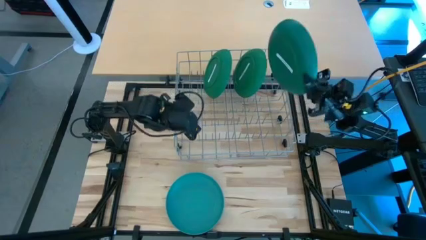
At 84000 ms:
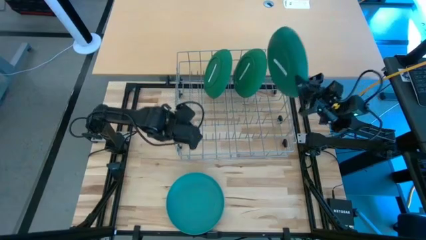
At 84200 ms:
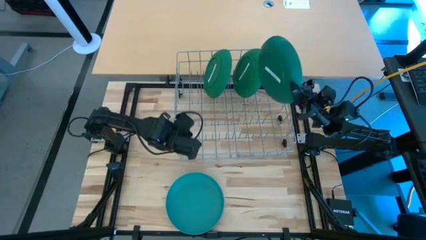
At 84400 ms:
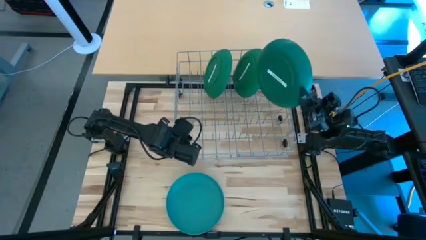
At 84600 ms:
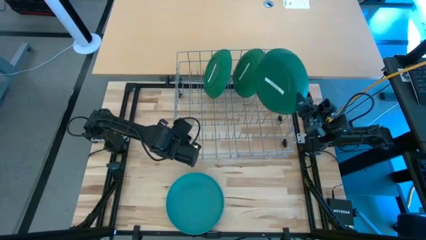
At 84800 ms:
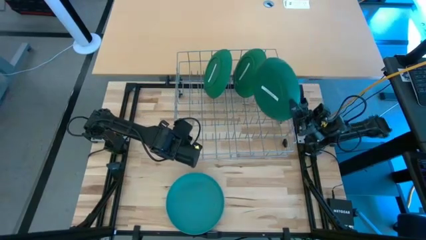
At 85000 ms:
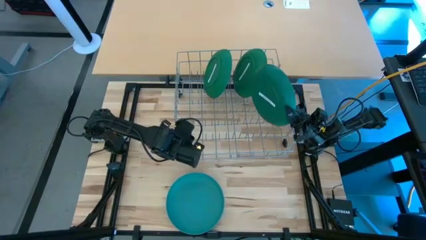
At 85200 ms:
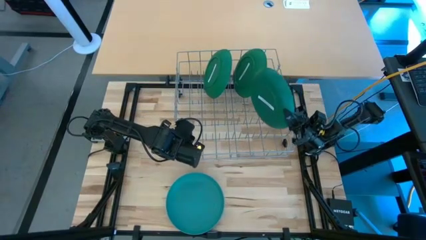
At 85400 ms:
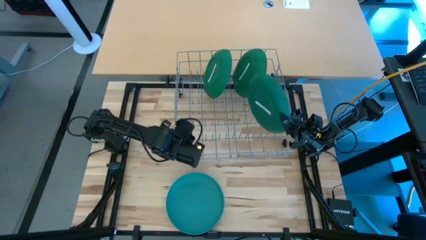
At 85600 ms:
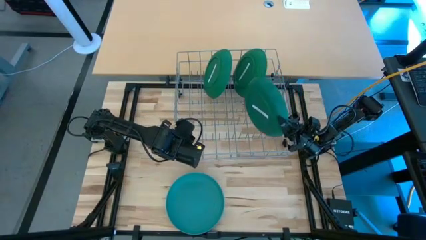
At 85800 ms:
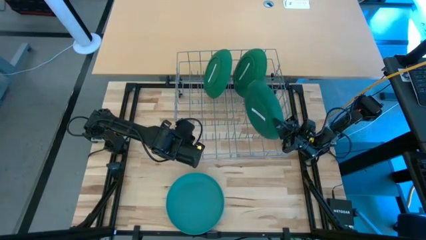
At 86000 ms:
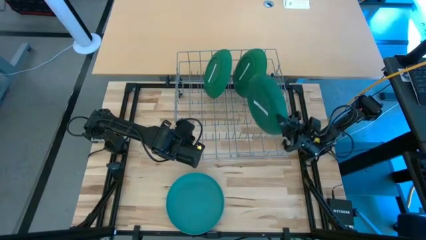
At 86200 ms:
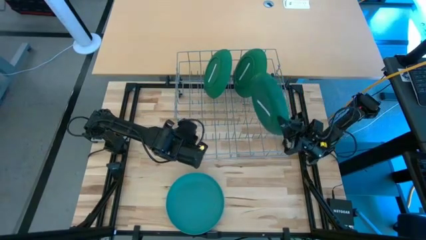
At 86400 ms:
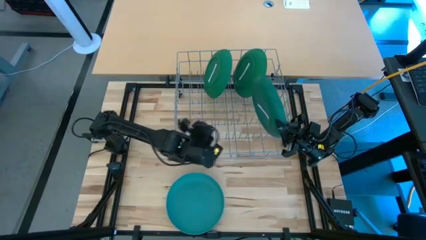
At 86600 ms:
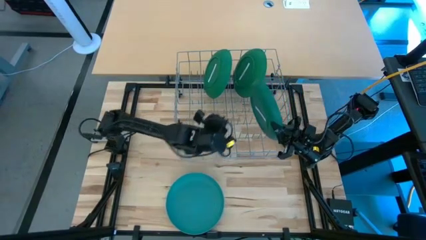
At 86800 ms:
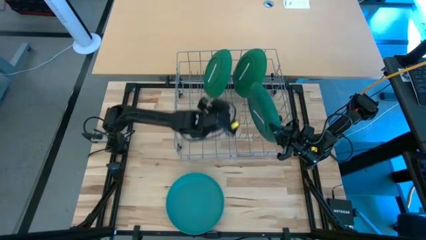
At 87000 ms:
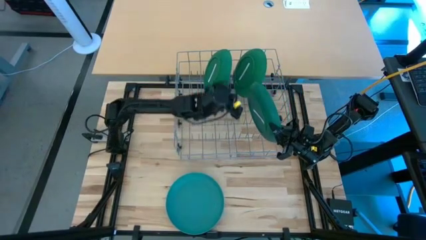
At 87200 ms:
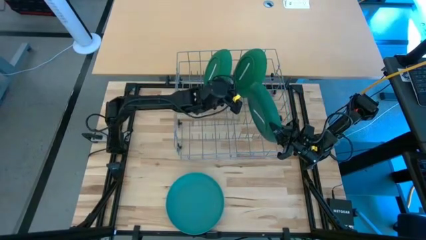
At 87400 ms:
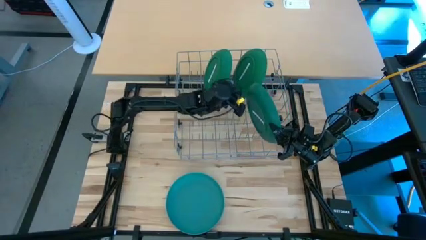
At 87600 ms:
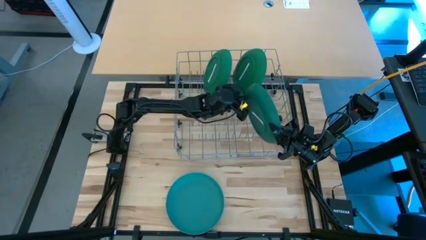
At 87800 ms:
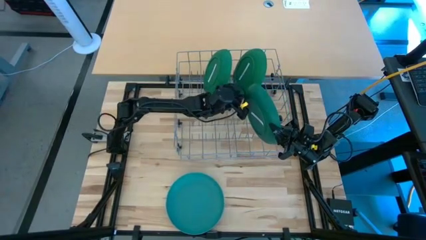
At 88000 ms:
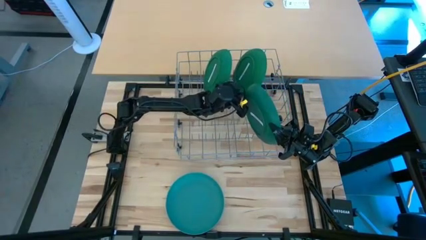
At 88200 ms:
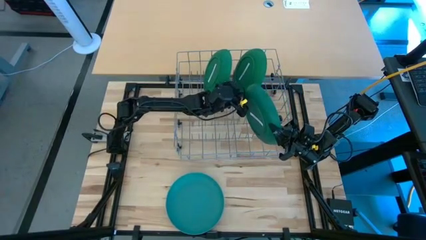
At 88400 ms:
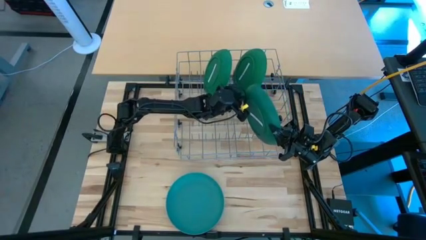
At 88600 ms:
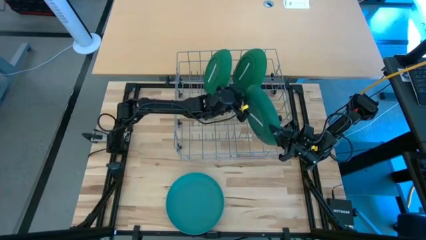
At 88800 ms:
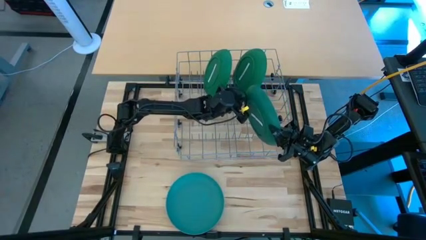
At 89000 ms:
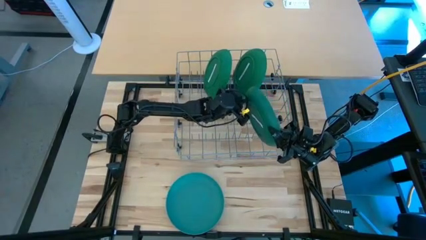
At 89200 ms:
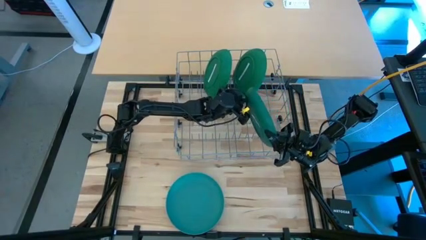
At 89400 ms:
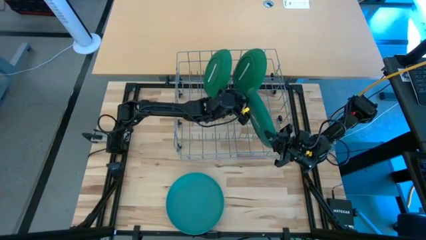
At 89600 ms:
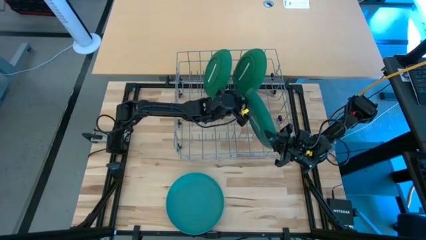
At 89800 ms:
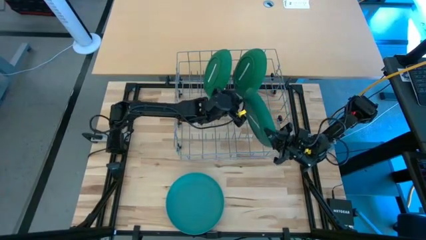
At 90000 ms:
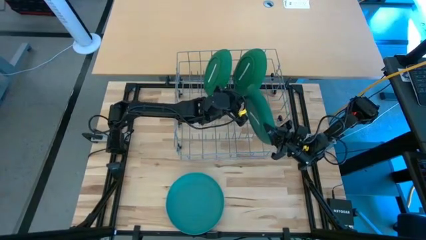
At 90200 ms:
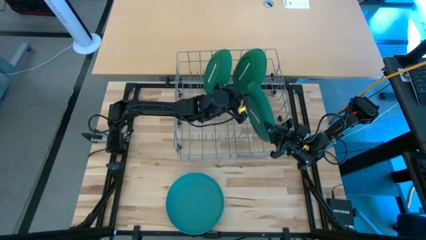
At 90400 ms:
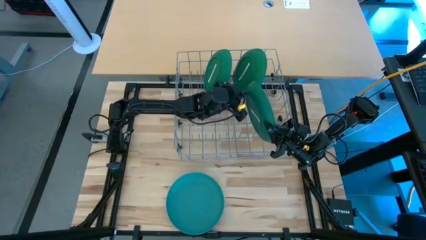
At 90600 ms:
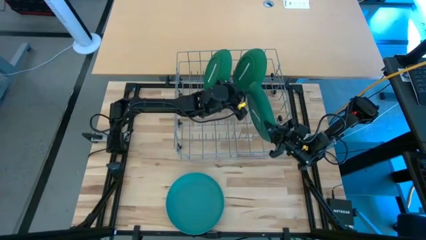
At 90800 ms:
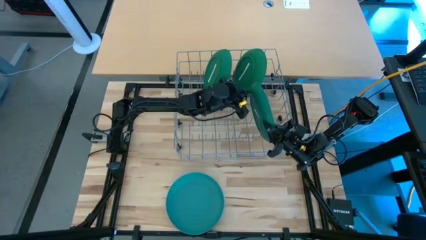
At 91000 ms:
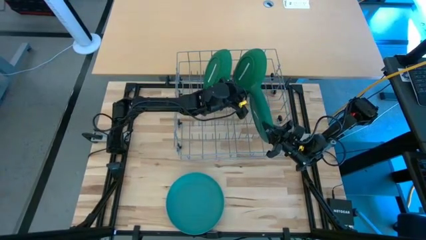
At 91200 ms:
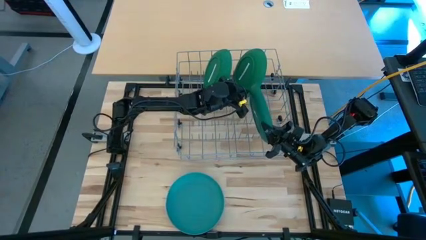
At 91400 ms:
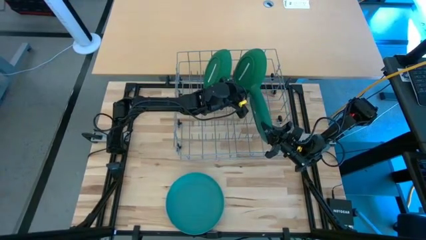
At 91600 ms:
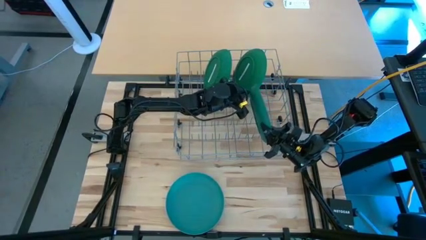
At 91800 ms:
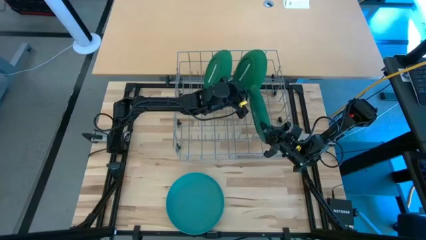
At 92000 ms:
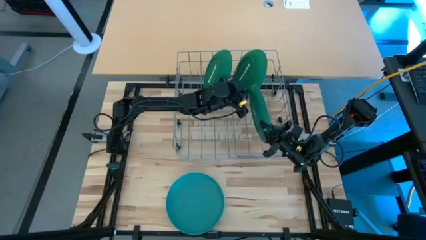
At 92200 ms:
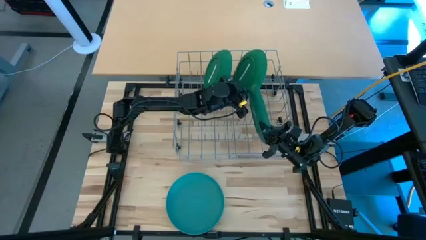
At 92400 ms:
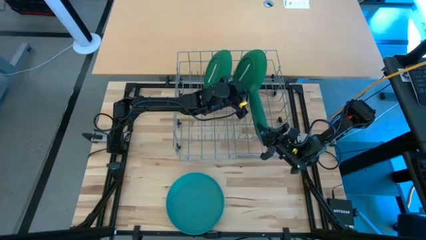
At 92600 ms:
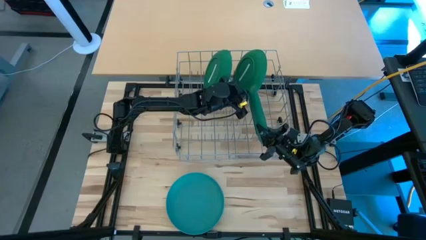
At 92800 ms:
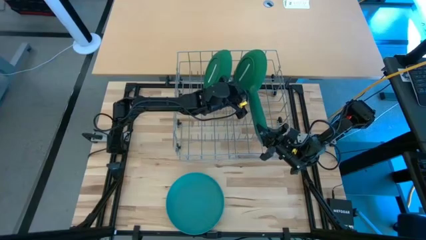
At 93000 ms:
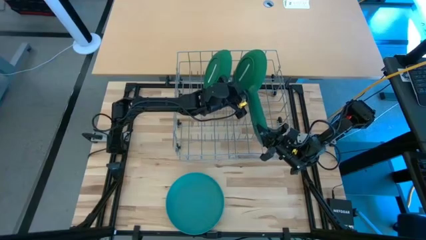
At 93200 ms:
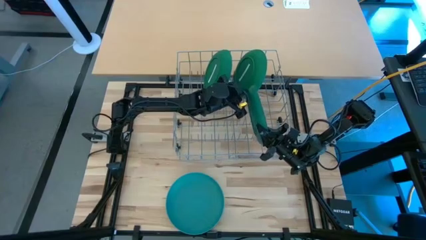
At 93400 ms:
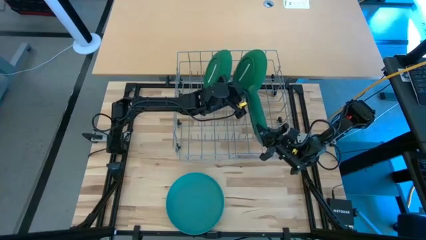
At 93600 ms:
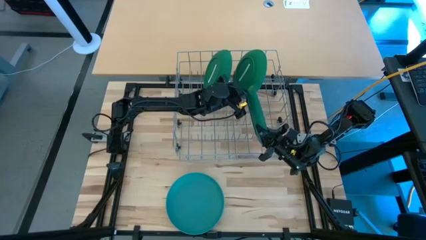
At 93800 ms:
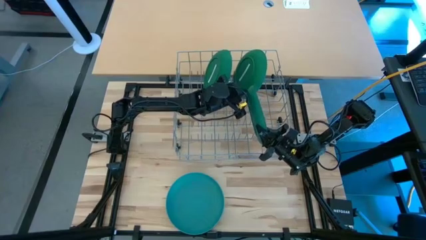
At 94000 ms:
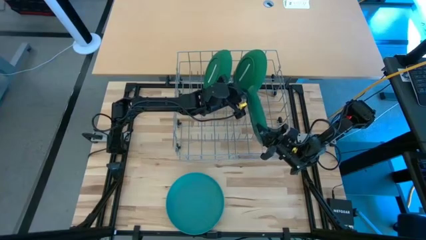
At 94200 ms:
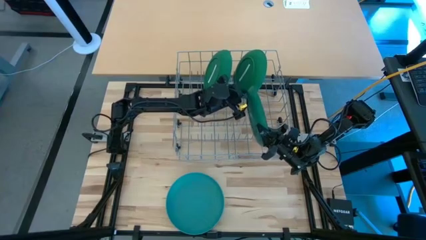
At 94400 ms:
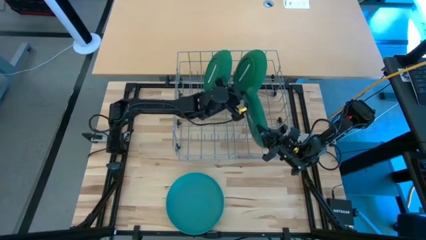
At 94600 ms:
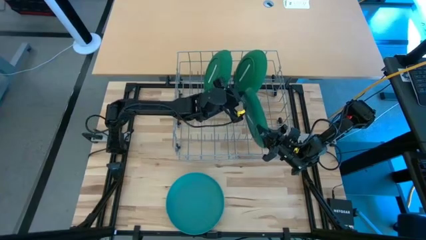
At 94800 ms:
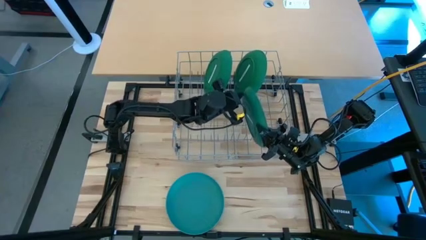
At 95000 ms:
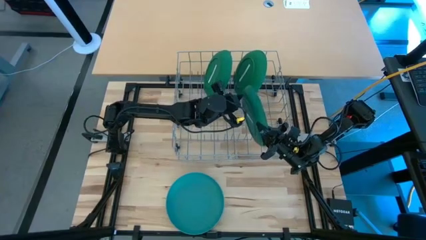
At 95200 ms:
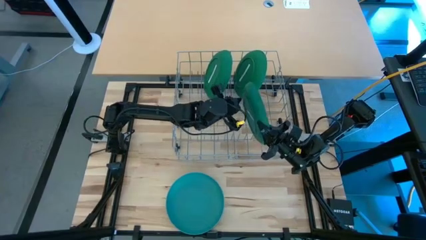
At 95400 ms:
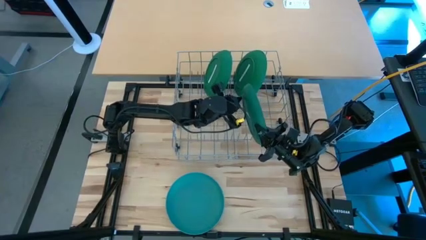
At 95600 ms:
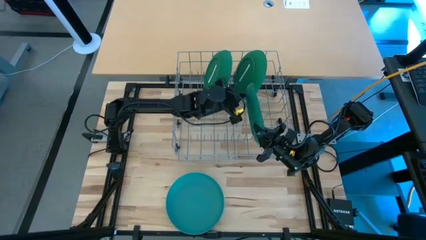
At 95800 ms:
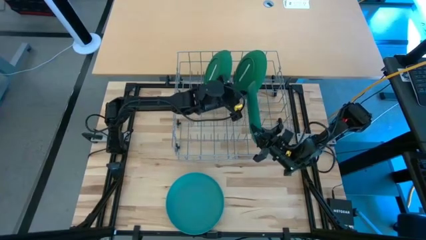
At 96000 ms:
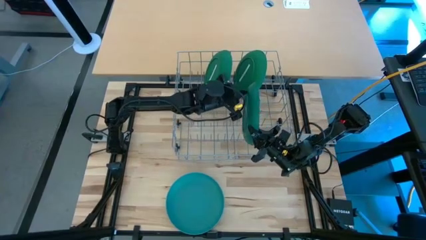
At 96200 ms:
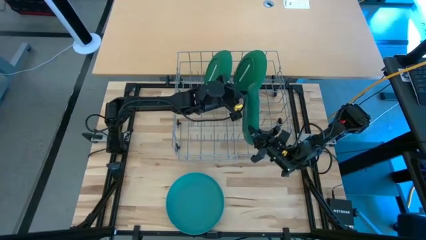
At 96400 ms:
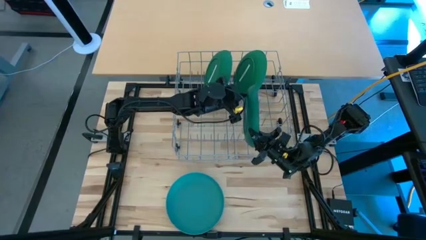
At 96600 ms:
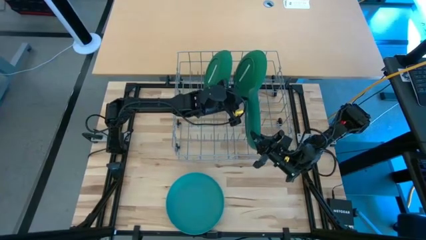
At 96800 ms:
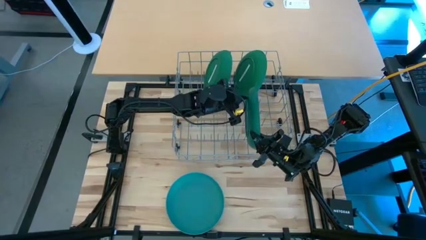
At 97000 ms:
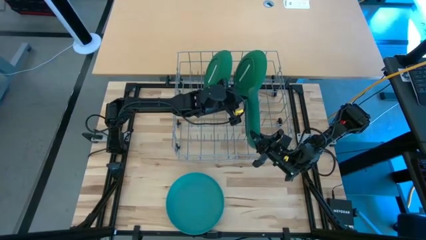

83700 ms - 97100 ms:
Task: Sort dishes
Put the green plate in the dish rack
